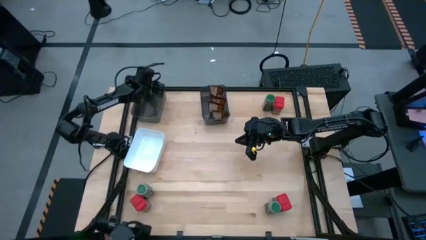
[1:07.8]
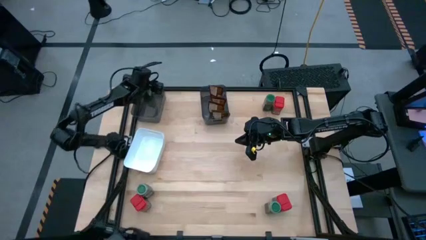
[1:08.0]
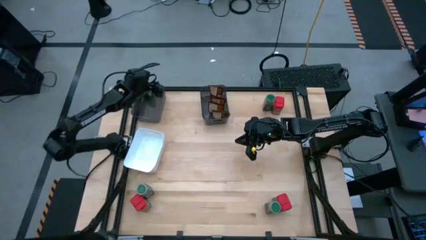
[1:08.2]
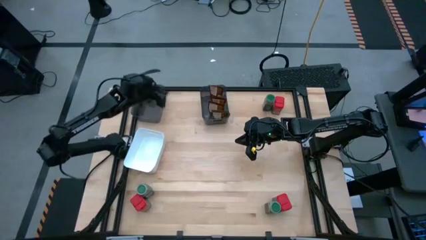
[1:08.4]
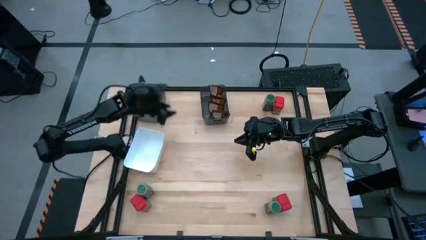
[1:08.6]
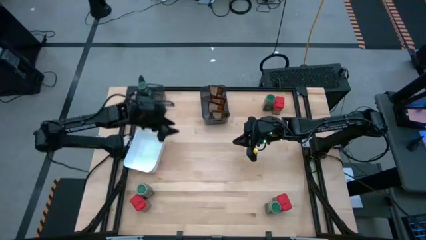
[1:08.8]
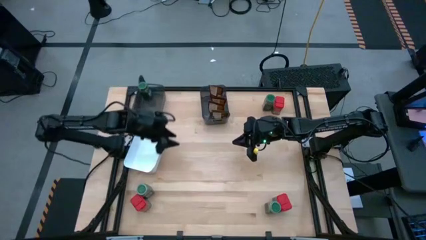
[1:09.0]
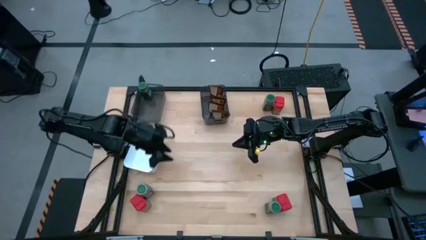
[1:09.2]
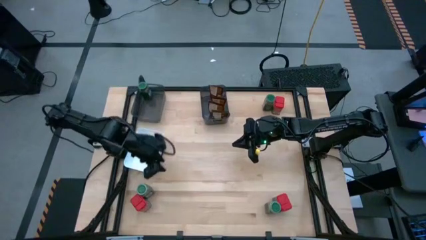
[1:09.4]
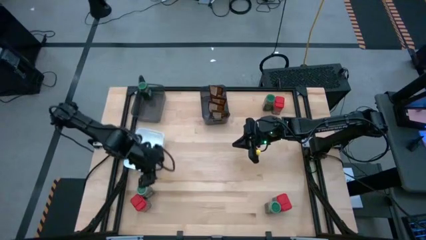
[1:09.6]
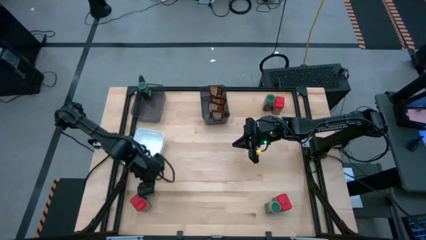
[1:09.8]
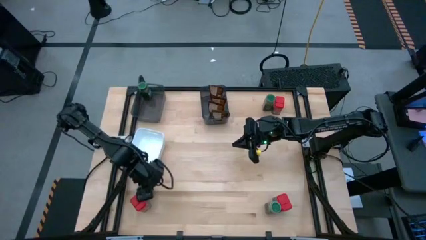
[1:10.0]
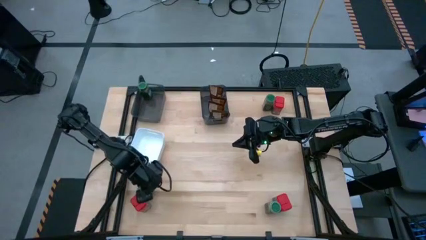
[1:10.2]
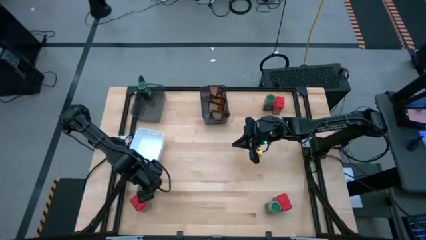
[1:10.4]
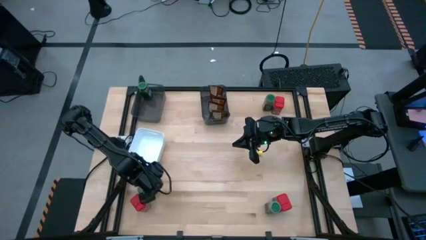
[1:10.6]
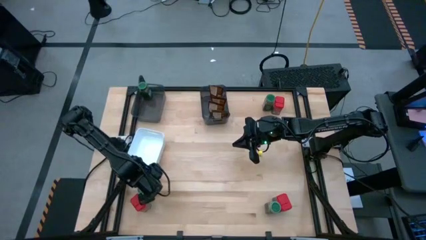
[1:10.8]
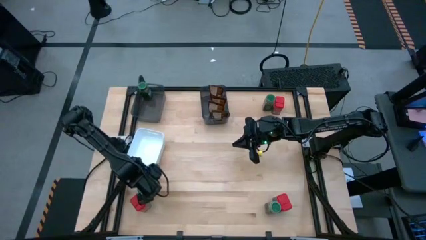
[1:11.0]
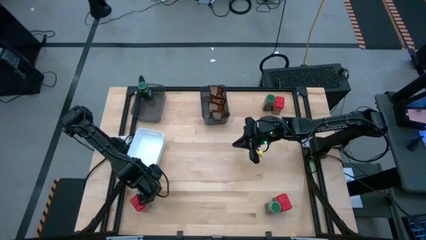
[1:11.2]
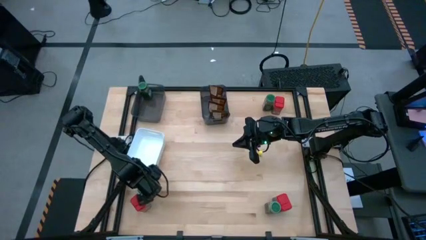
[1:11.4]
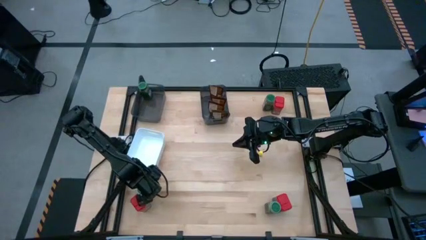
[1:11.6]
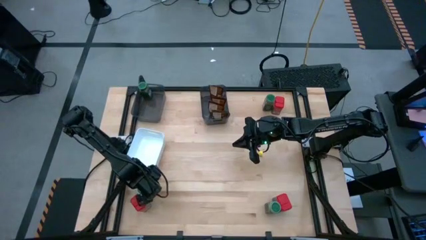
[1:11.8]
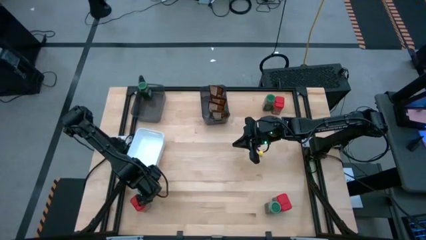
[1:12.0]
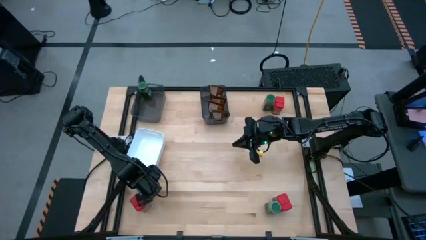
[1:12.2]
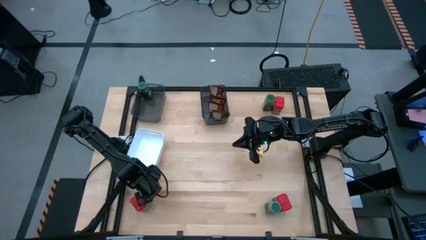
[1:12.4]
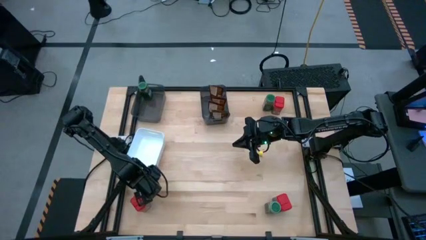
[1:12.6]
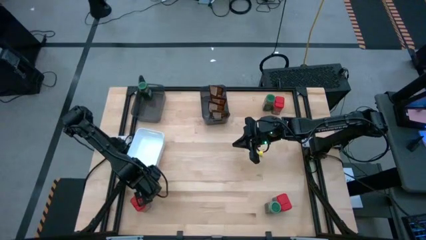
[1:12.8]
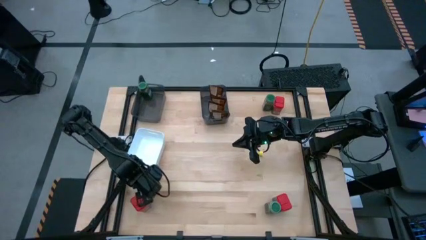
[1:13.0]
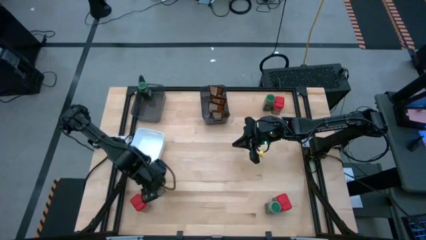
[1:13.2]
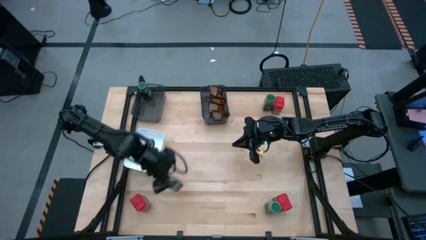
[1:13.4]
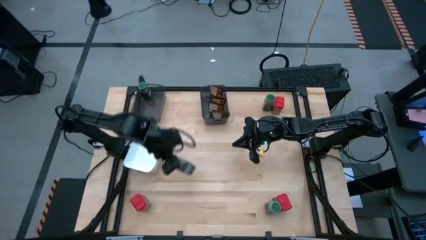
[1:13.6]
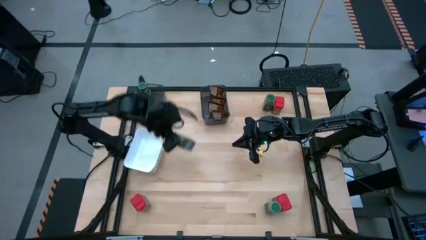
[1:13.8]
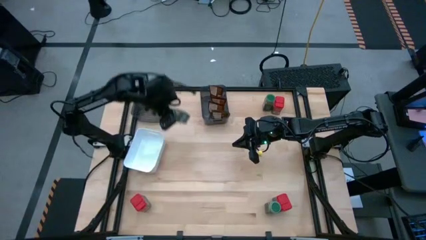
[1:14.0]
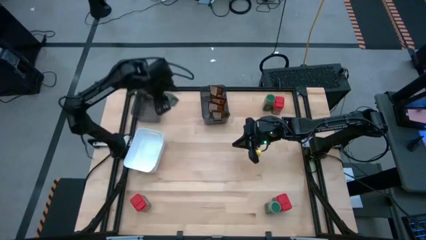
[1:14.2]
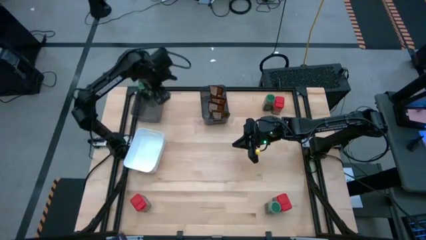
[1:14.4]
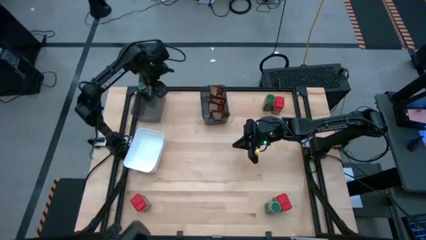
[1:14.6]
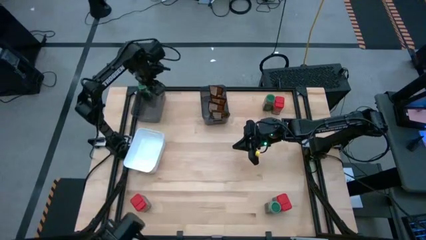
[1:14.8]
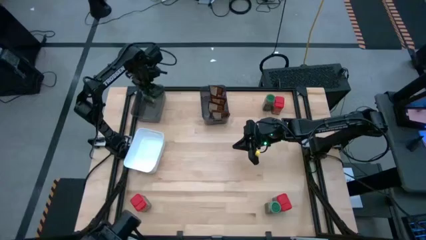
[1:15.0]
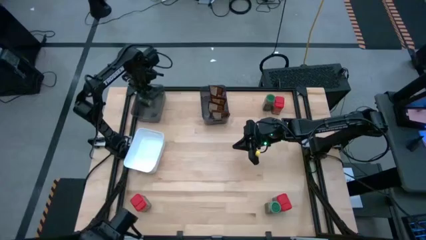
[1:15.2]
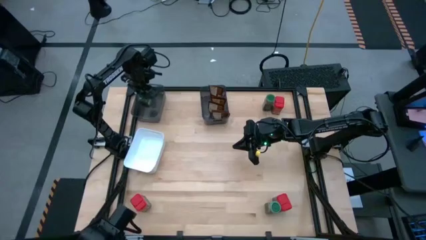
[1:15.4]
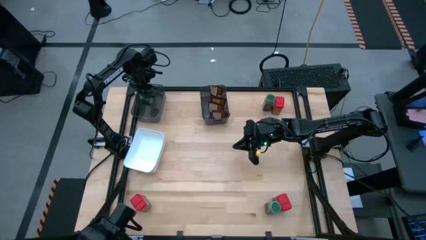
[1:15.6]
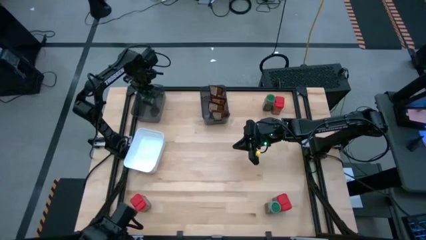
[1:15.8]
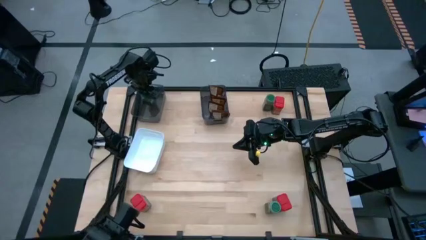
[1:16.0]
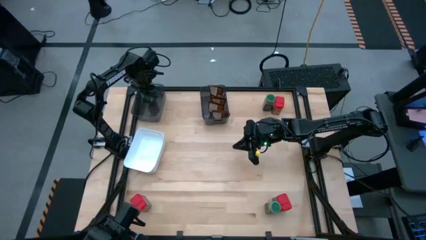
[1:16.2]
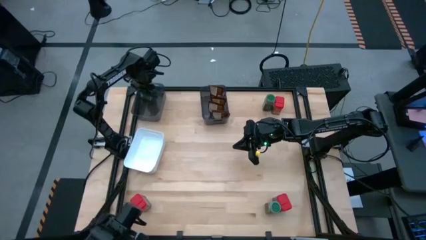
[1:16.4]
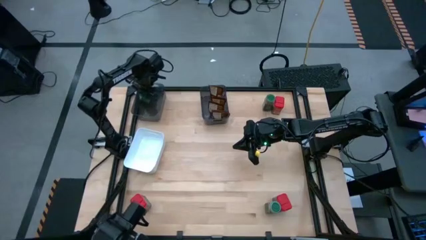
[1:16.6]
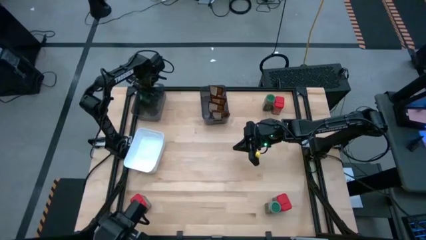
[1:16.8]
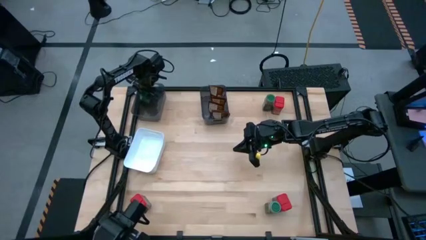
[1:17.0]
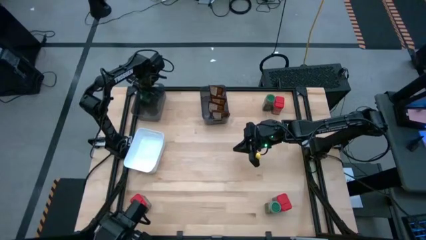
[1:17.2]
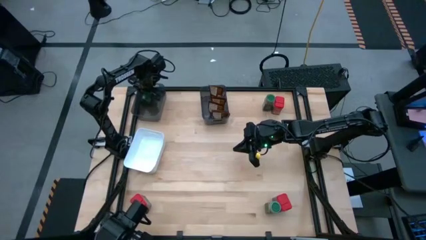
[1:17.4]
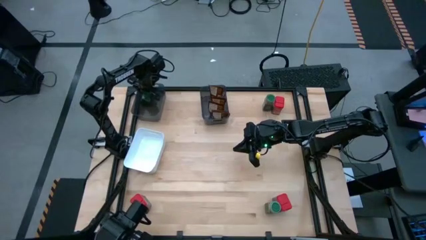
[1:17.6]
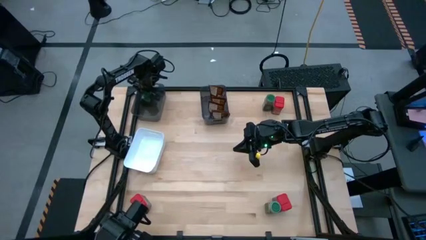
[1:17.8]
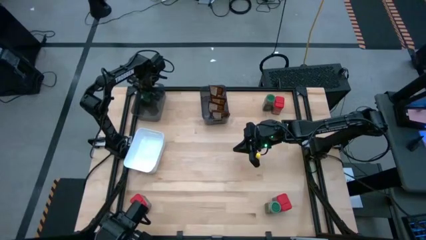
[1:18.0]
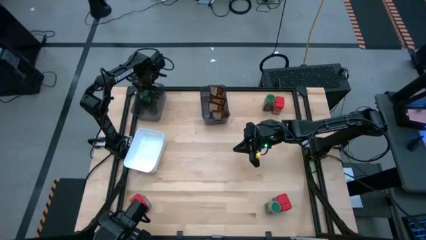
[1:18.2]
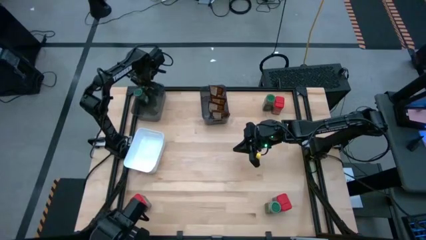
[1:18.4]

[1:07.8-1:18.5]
Task: Sort spices by type
Put the bottom left green seasoning bottle into the left black bin

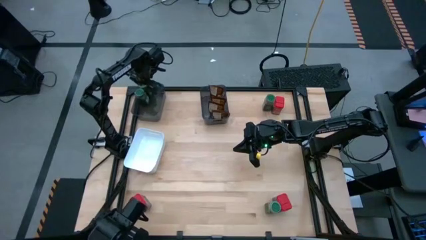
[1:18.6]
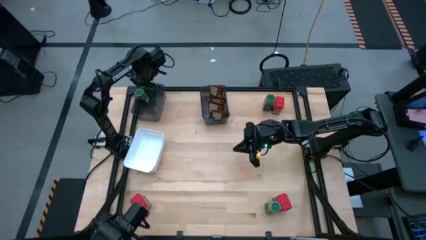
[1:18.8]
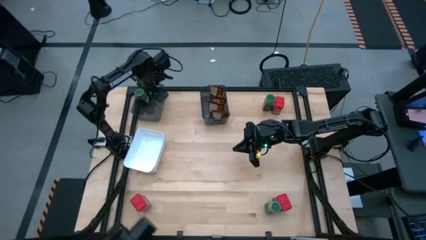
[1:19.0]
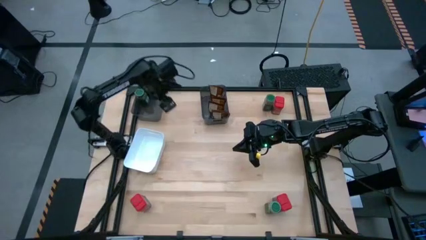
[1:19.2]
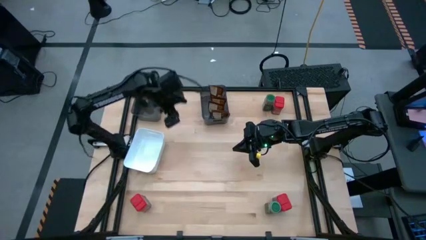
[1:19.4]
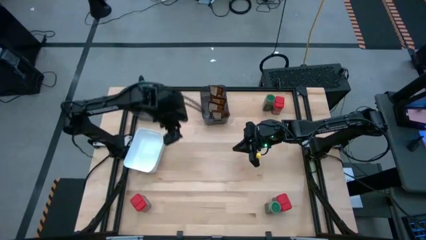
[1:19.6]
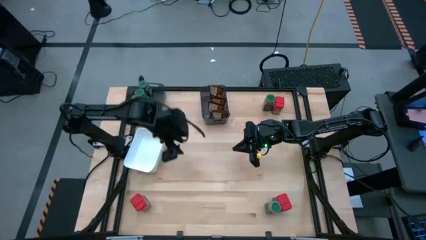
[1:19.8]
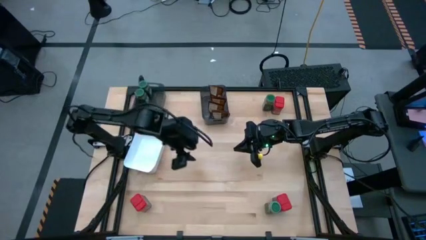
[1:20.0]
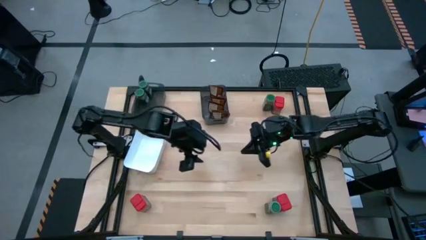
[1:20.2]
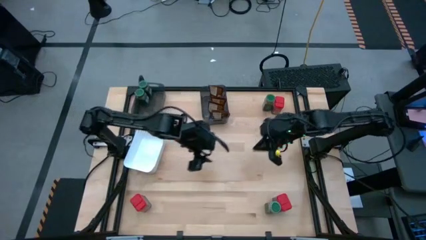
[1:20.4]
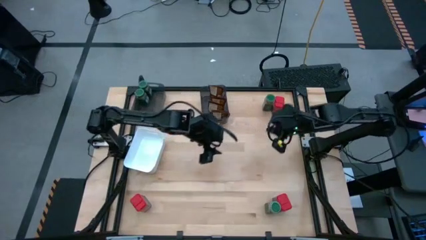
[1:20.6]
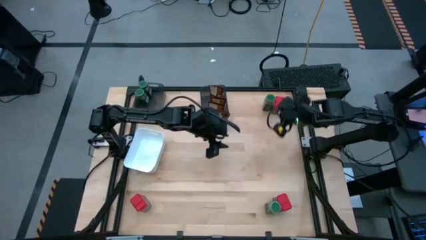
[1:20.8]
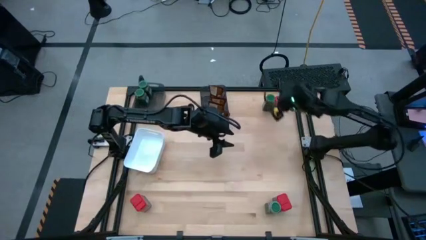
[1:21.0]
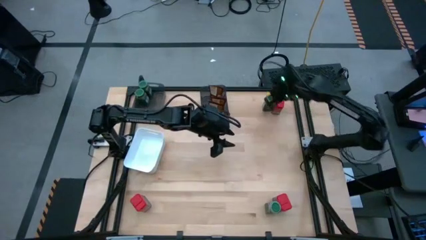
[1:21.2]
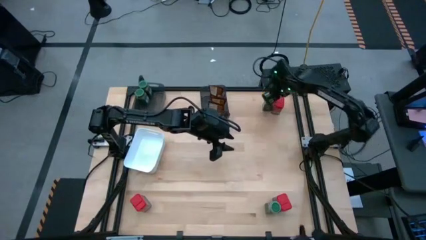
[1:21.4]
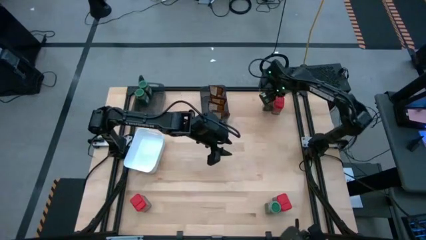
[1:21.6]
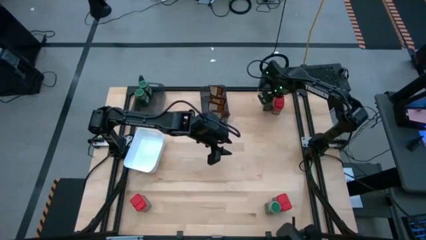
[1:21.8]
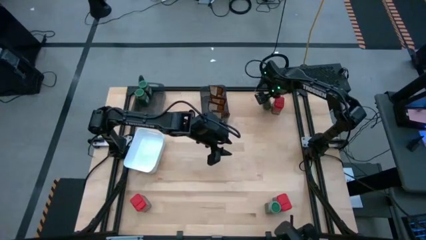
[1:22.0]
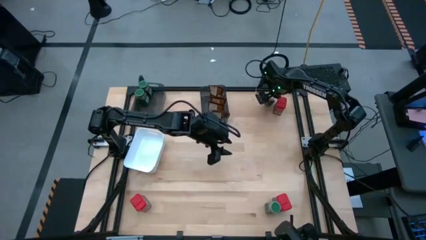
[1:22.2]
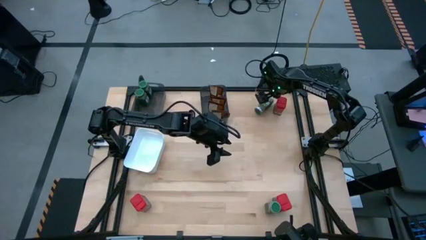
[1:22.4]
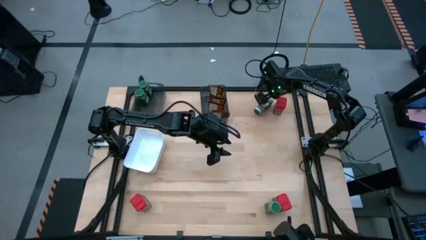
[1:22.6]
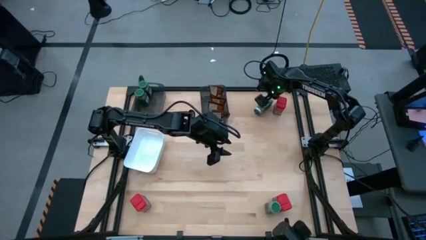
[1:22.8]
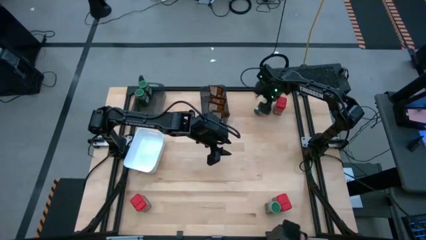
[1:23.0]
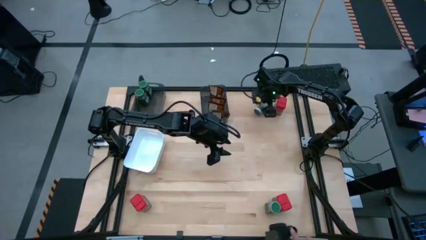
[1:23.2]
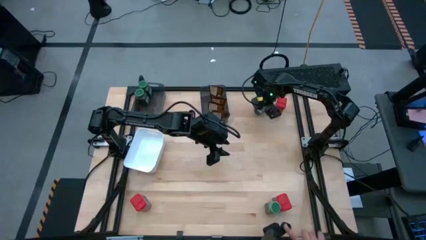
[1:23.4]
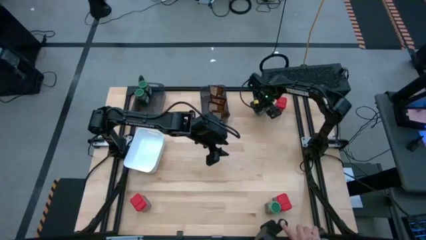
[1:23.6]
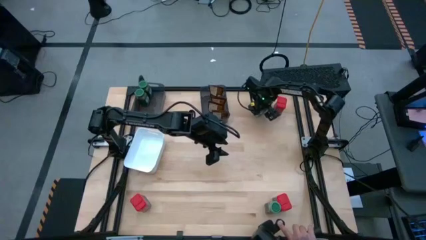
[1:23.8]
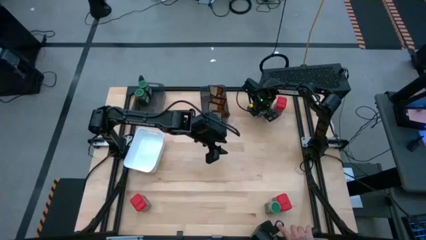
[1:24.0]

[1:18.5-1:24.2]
Put the top green seasoning bottle into the left black bin
